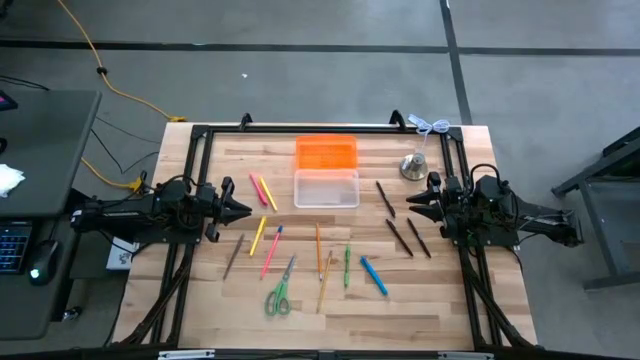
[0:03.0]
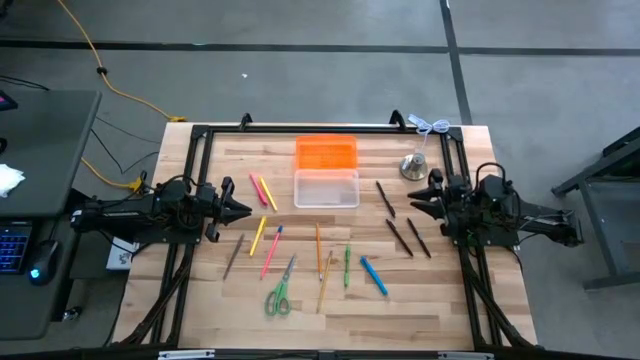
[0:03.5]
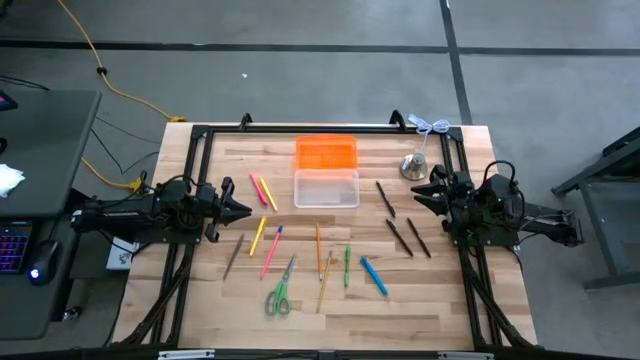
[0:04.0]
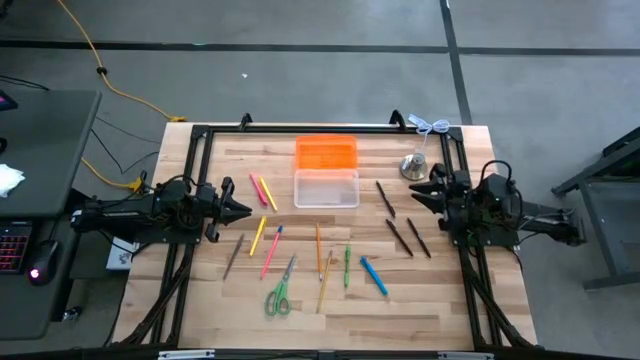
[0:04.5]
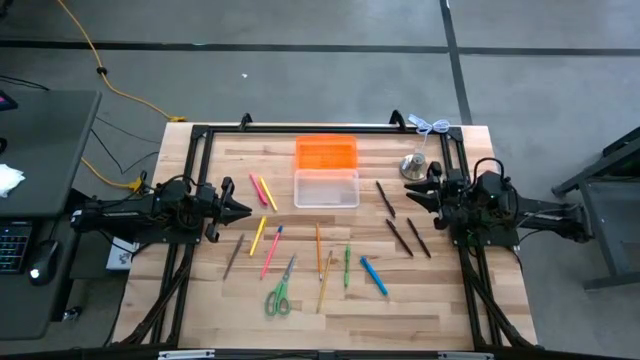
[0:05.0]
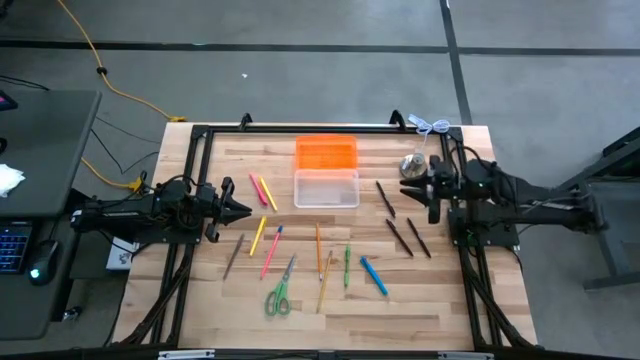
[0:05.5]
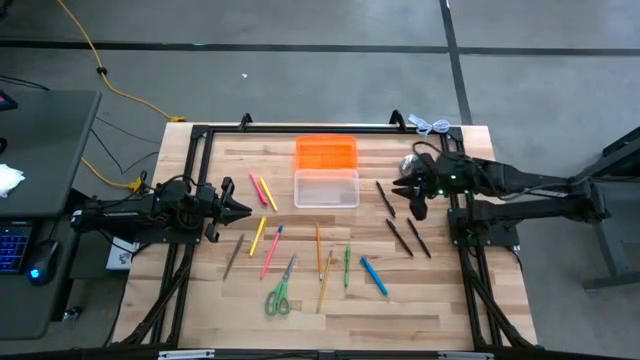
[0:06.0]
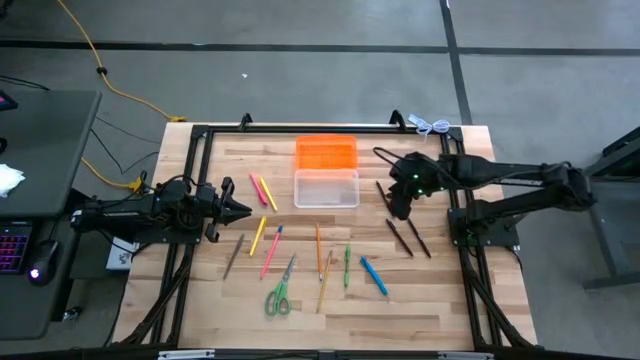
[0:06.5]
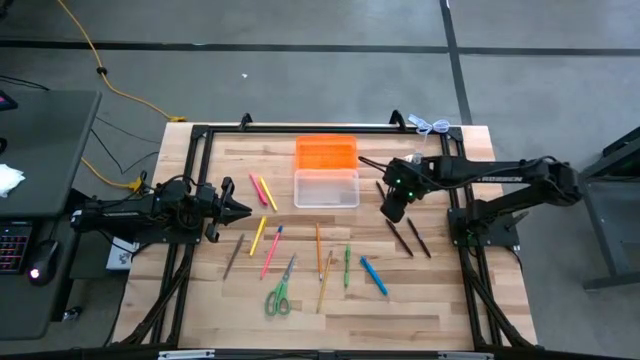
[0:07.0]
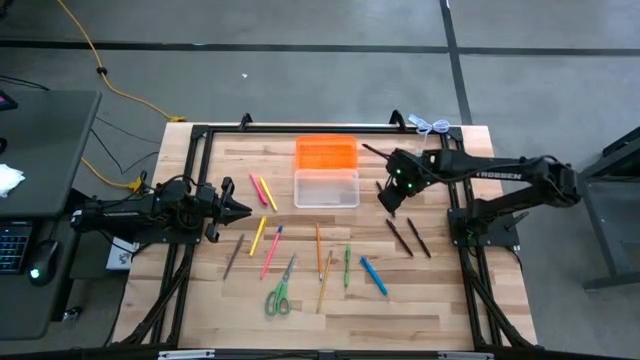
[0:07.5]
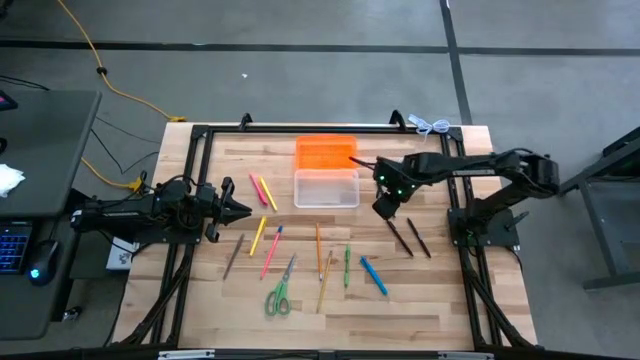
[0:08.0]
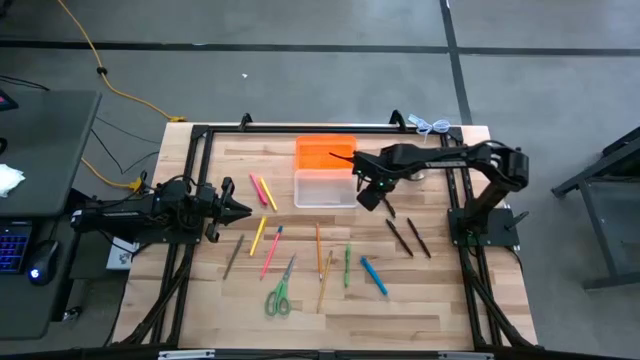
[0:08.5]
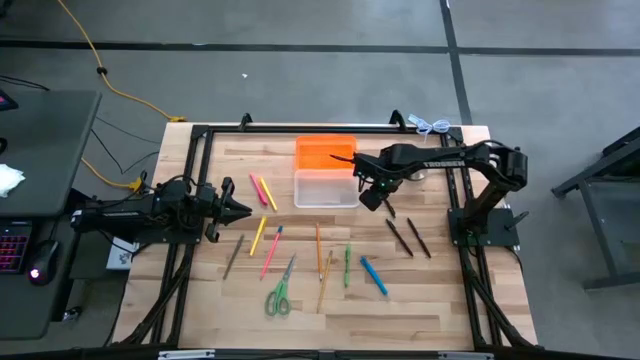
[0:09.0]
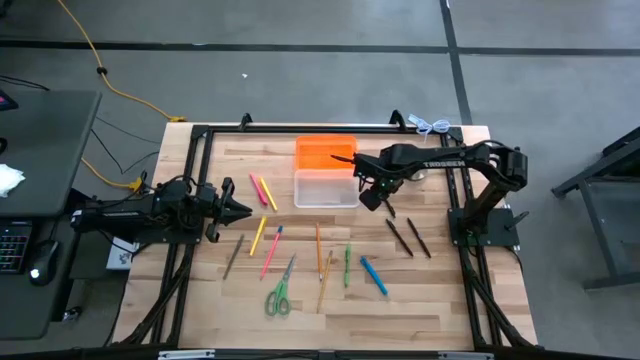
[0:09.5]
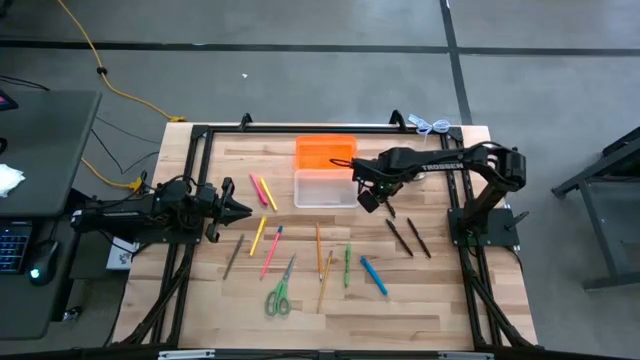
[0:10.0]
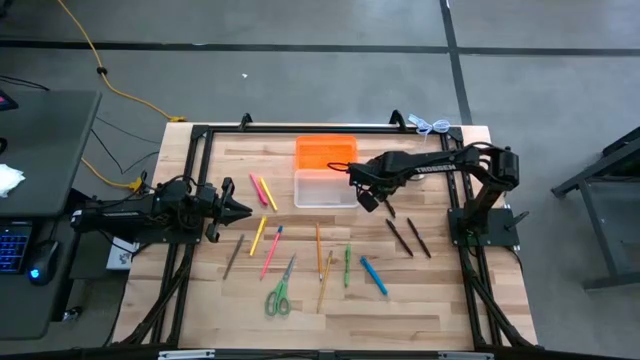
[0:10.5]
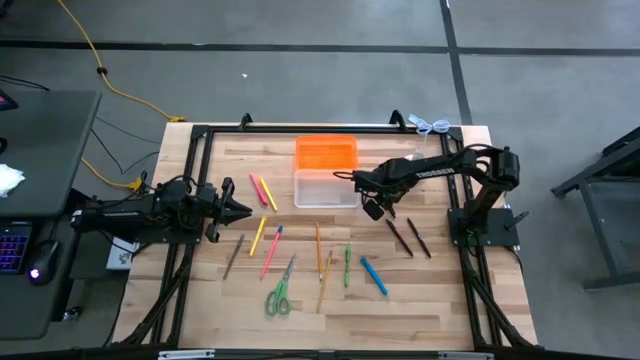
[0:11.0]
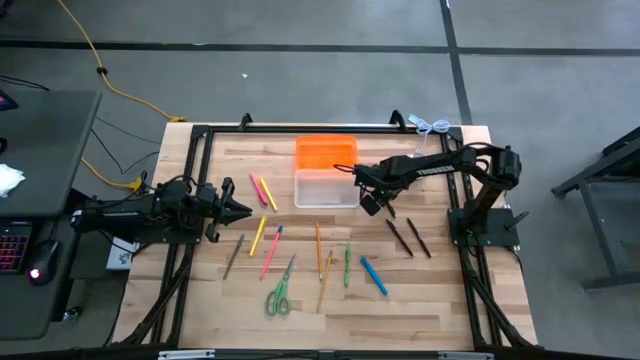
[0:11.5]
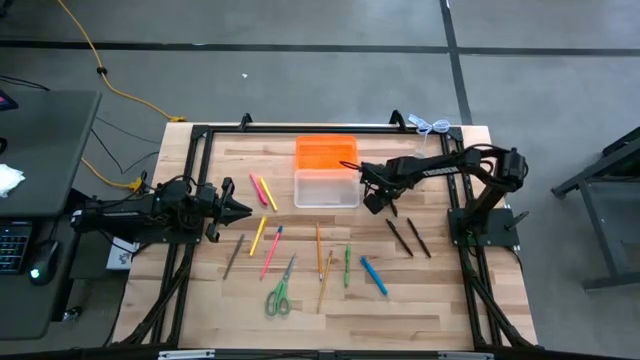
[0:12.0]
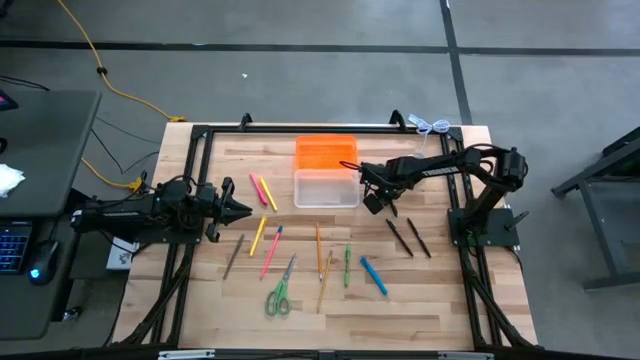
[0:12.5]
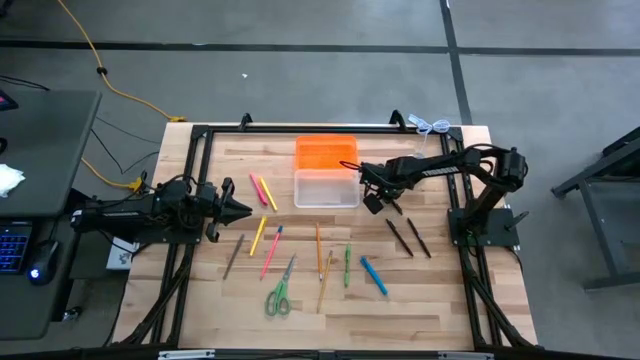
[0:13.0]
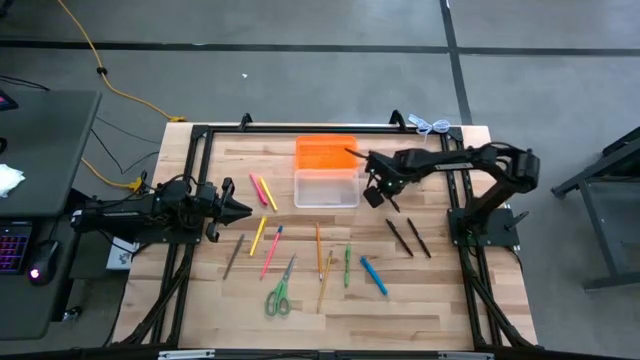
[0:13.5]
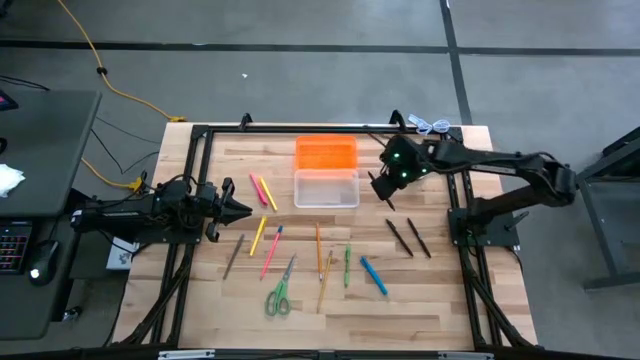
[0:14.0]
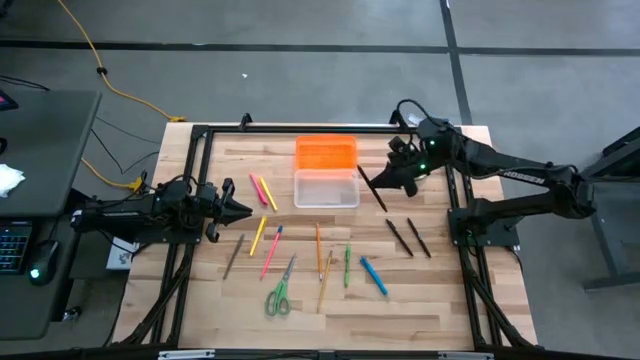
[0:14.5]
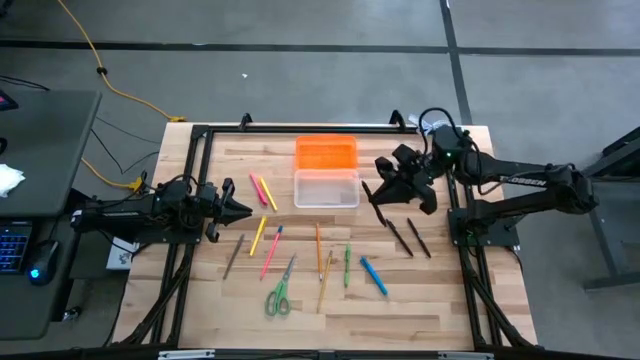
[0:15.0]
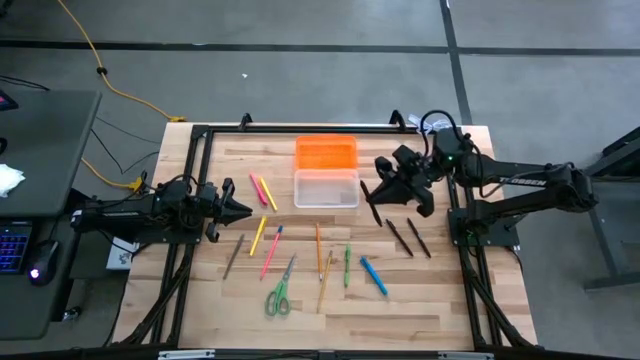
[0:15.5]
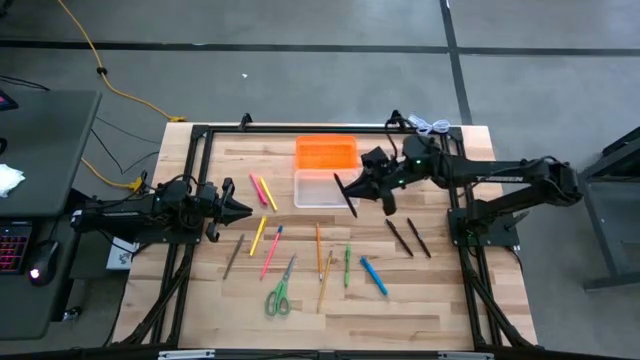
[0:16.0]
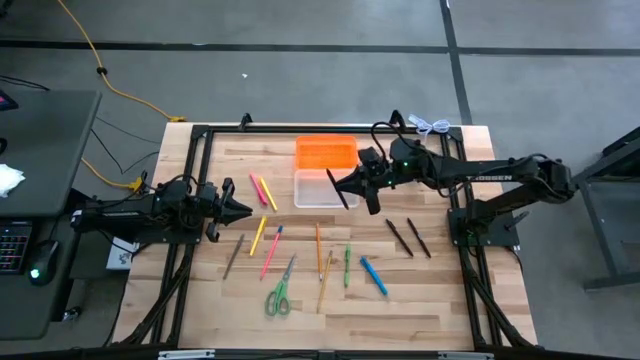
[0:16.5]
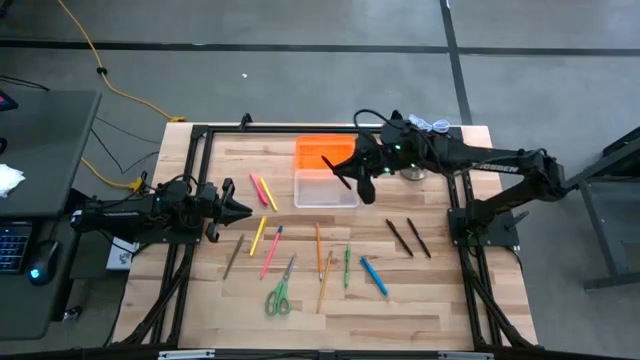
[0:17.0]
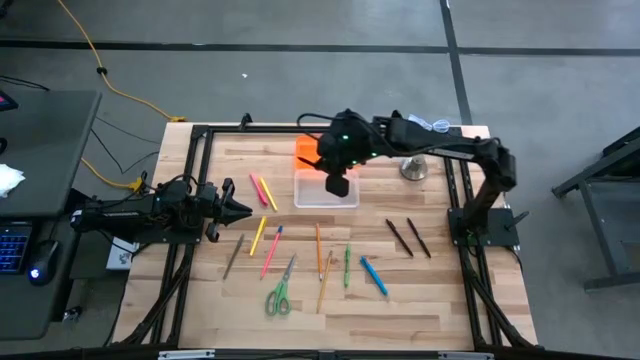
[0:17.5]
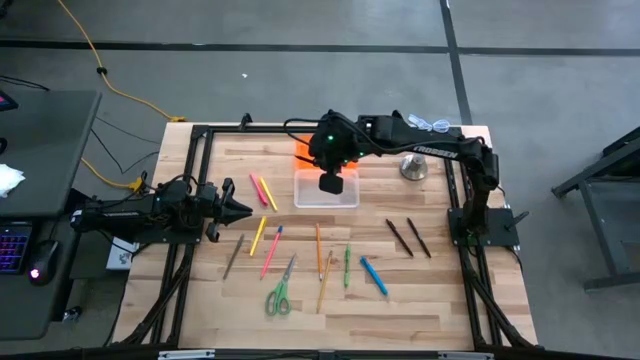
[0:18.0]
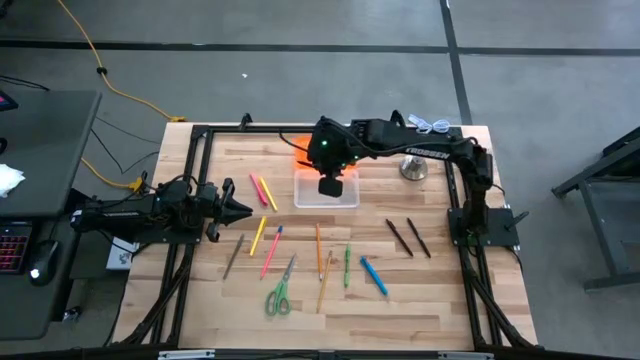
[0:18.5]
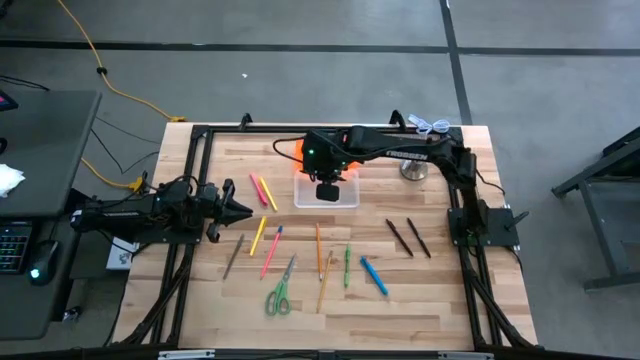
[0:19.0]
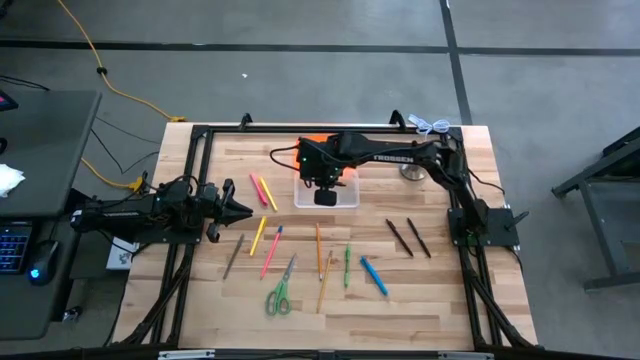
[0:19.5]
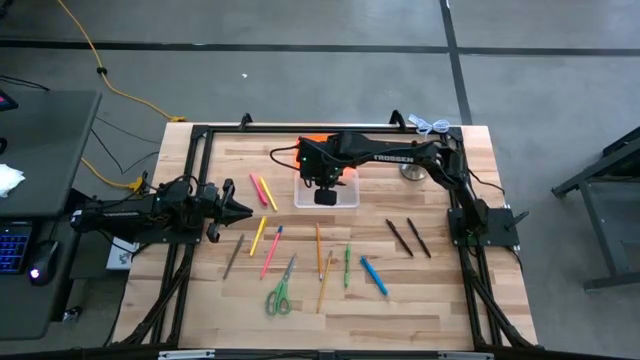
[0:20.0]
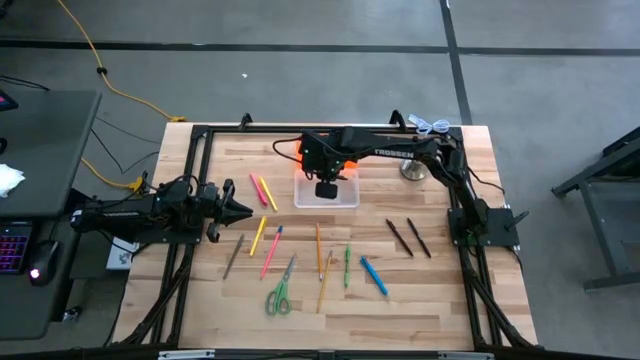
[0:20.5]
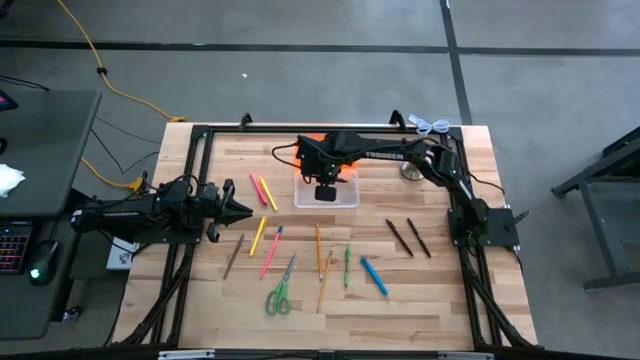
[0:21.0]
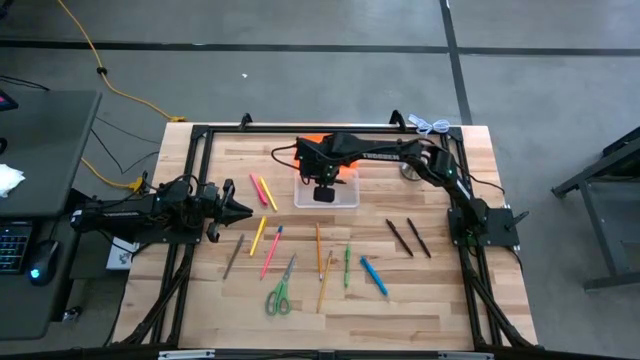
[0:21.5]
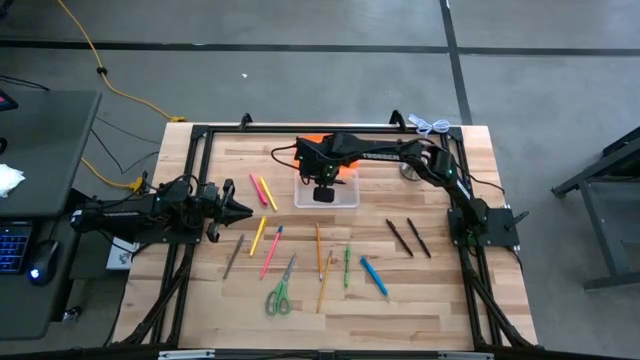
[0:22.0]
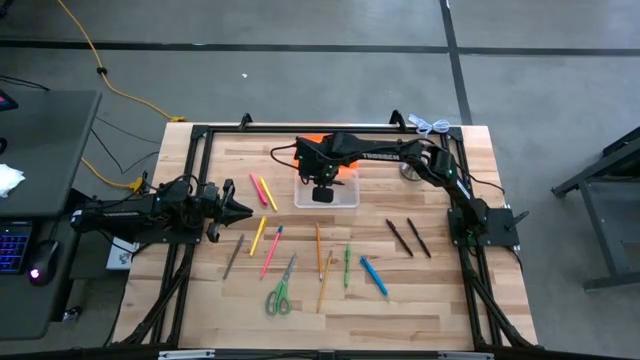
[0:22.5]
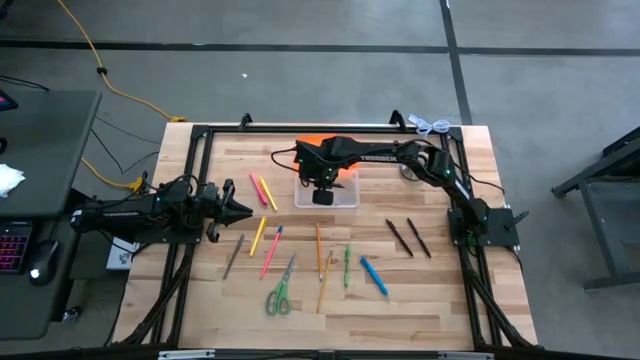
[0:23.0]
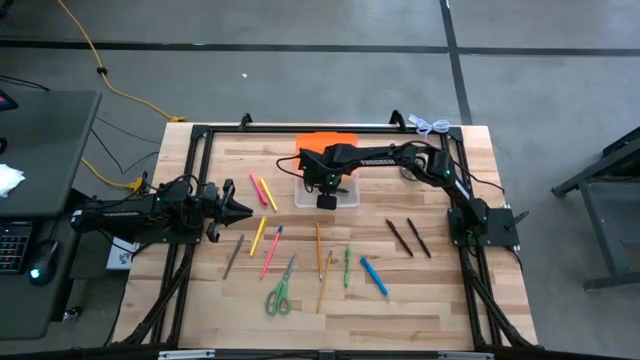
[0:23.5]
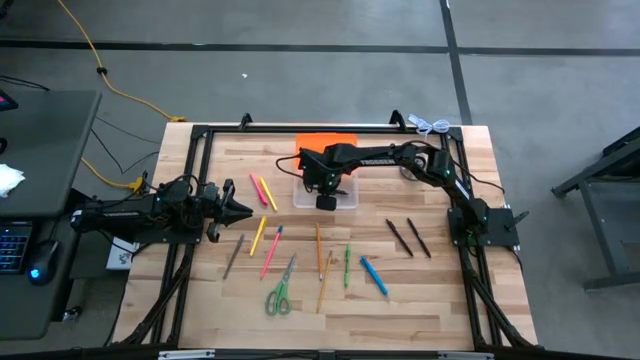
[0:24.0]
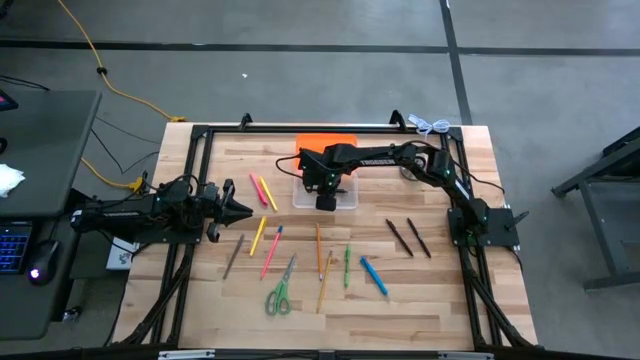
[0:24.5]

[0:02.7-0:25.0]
Task: Pick & place school supplies into a supply box
Put the black pen into the transparent supply box
